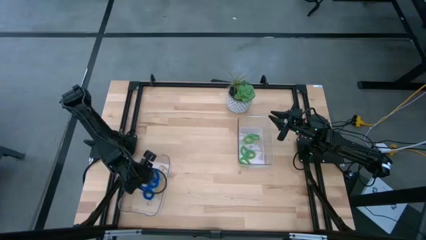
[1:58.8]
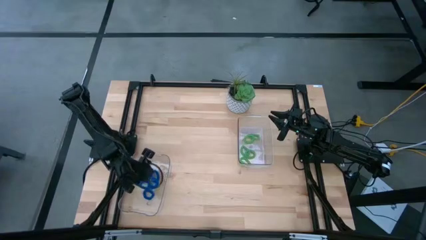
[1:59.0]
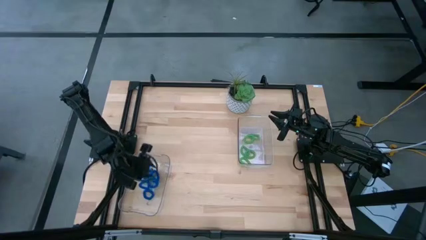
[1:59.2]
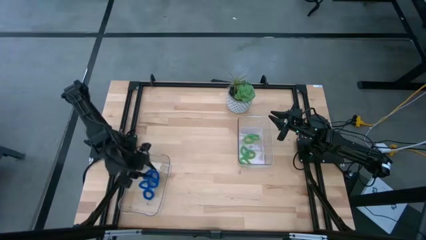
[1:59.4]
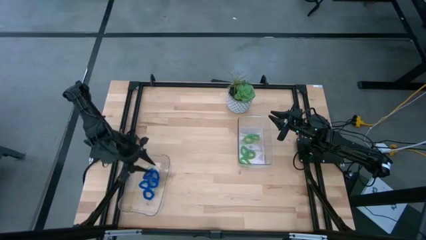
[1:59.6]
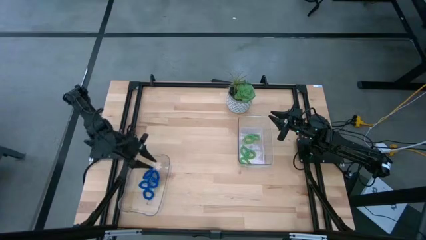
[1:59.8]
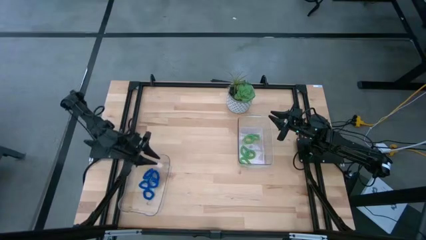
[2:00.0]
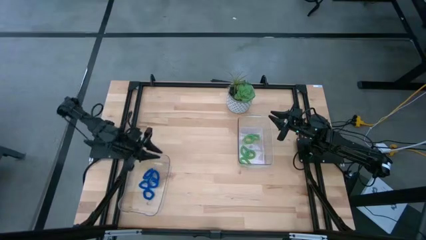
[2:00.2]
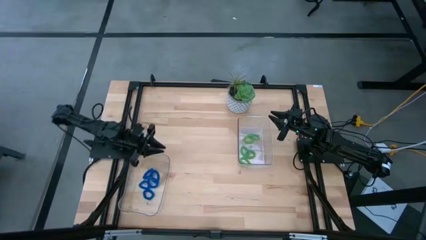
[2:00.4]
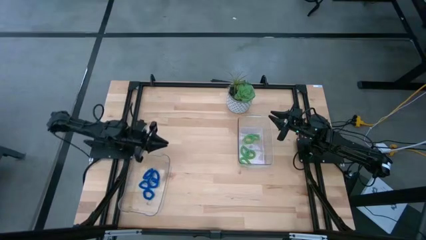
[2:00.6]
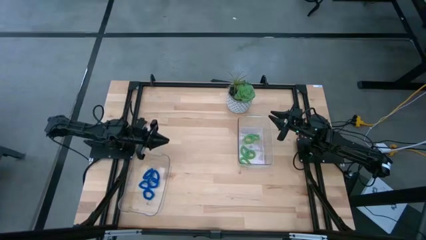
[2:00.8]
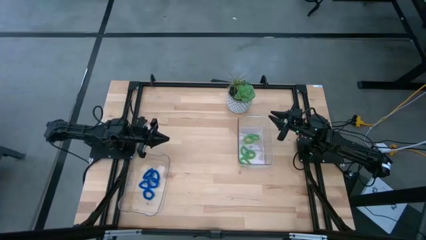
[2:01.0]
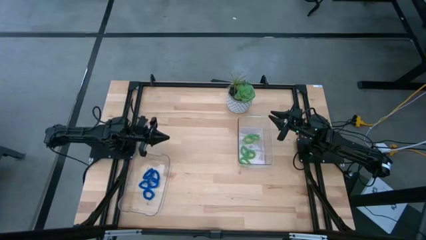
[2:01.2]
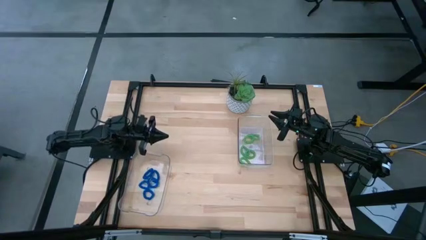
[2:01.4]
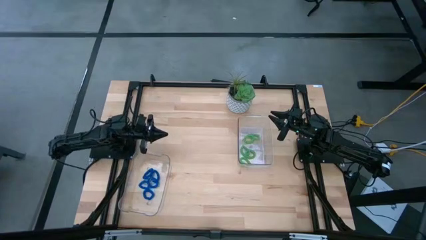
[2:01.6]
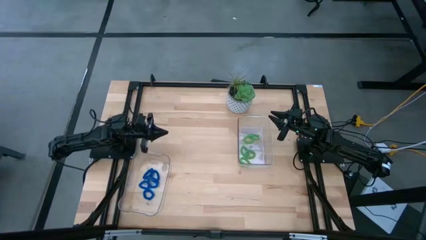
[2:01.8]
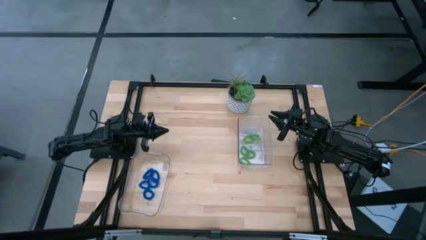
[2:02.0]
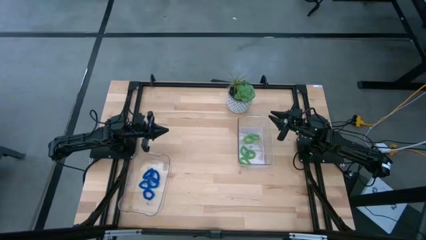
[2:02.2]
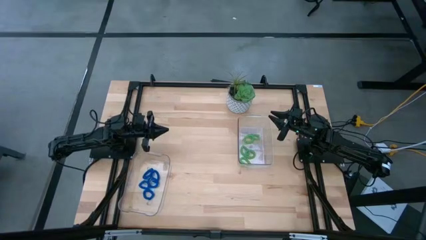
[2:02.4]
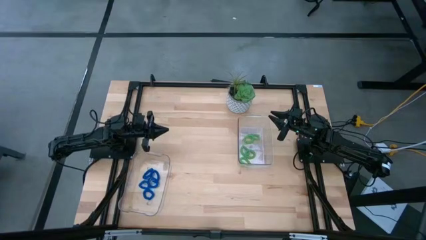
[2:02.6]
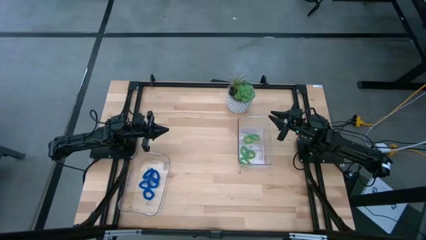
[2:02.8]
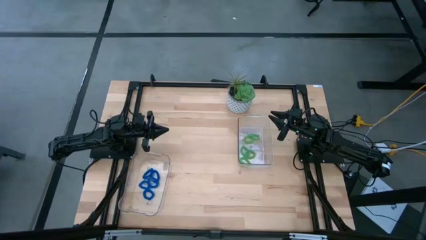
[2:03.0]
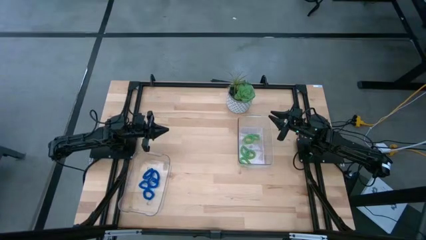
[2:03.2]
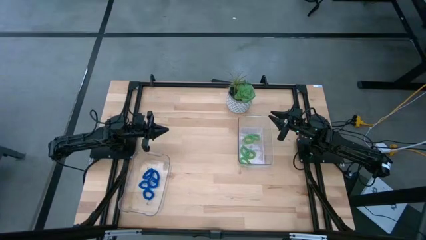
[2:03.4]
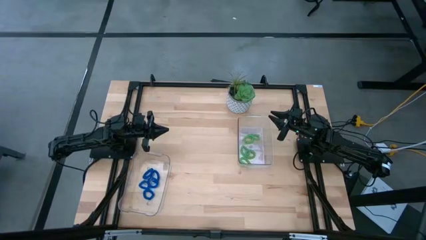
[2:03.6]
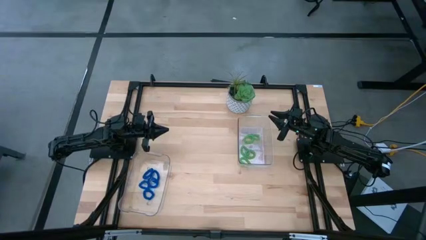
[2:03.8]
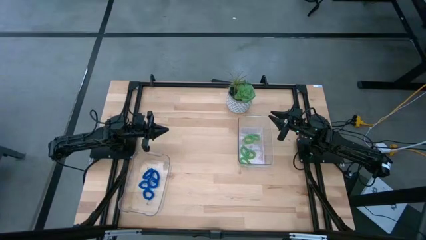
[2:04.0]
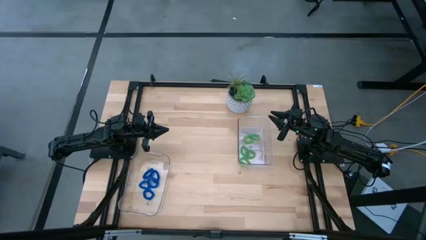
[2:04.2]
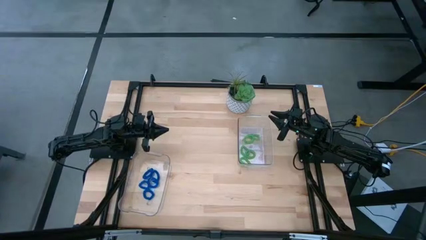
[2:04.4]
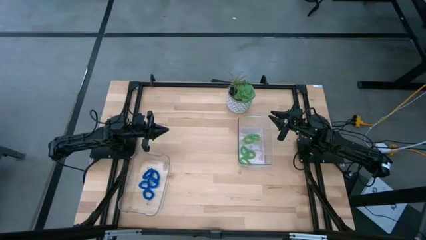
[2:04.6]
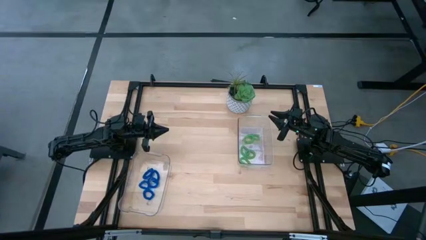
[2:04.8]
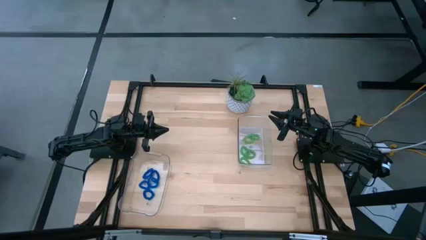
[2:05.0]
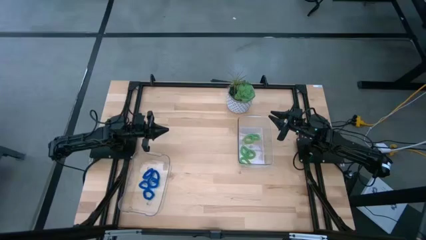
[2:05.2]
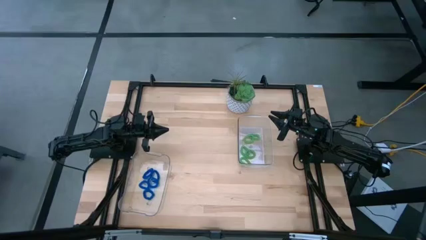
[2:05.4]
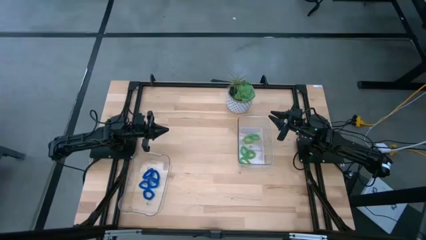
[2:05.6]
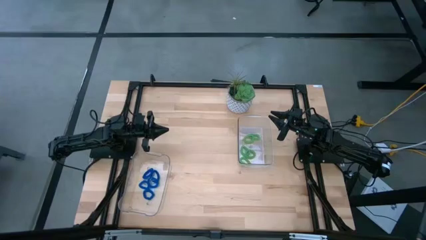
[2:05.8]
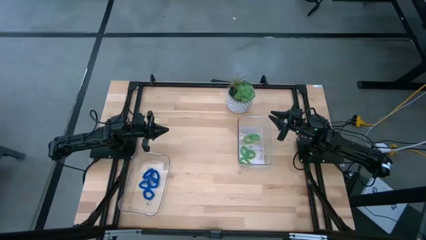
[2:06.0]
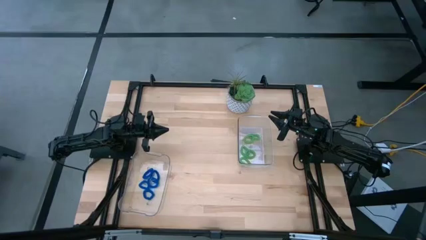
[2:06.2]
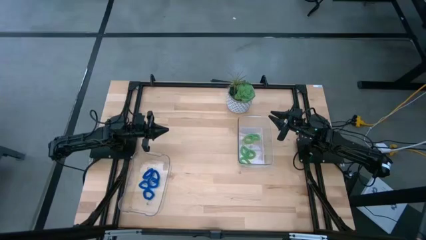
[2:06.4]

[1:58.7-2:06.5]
Task: Sort spring keychains
Return to Home Position

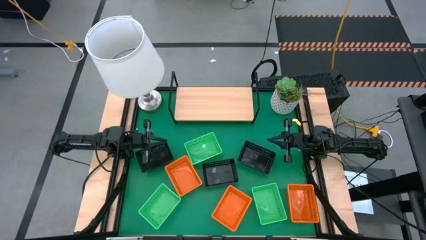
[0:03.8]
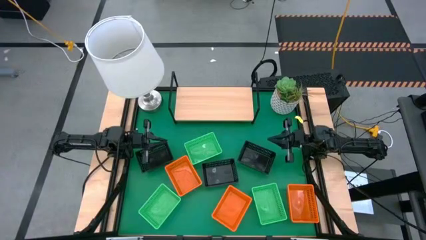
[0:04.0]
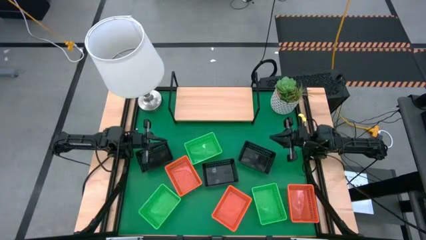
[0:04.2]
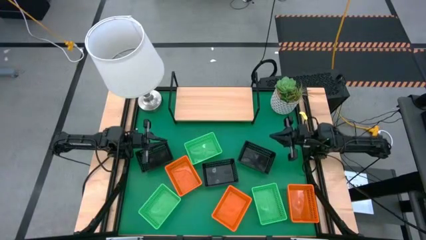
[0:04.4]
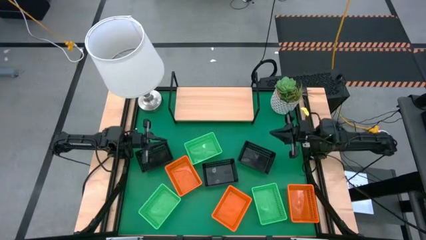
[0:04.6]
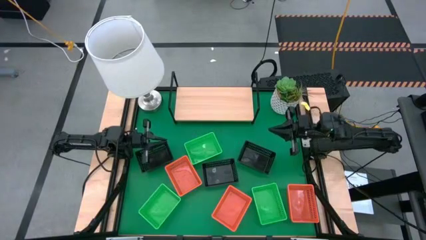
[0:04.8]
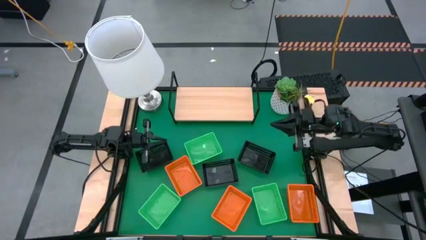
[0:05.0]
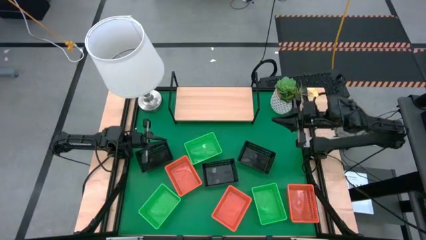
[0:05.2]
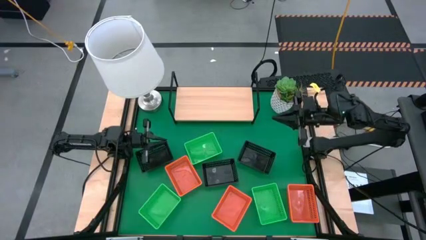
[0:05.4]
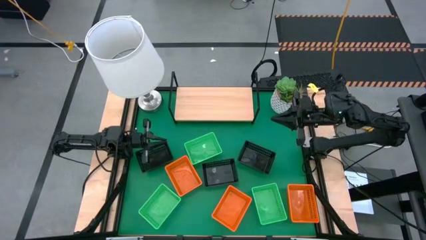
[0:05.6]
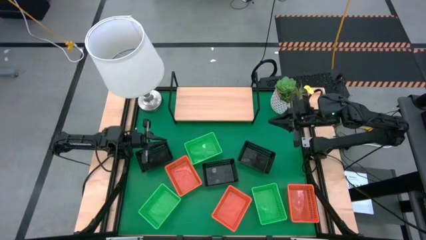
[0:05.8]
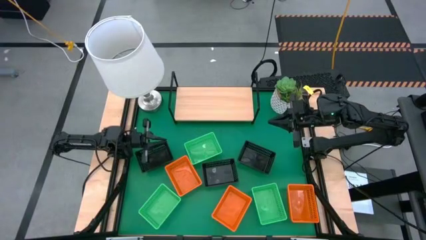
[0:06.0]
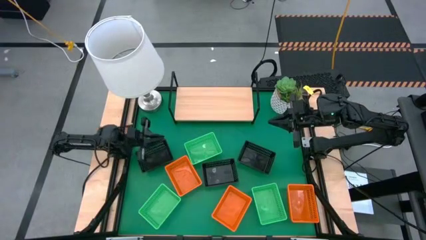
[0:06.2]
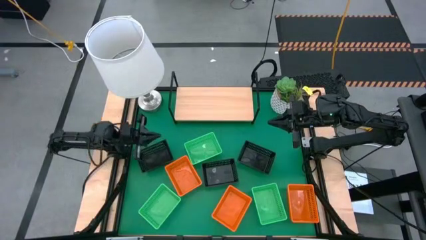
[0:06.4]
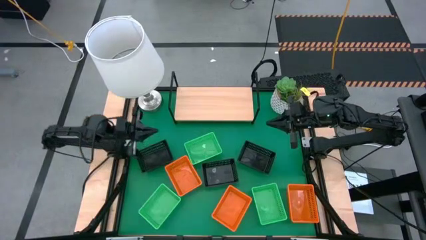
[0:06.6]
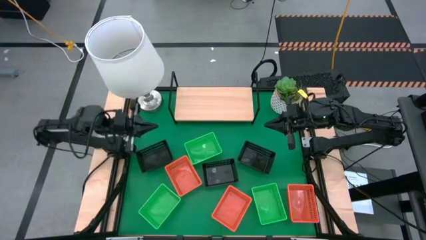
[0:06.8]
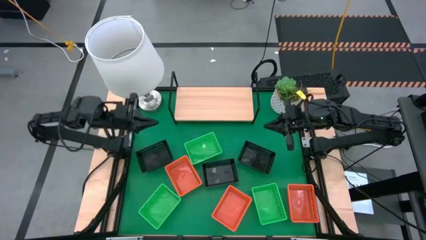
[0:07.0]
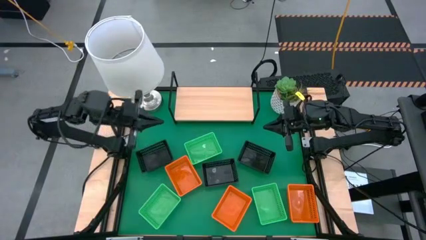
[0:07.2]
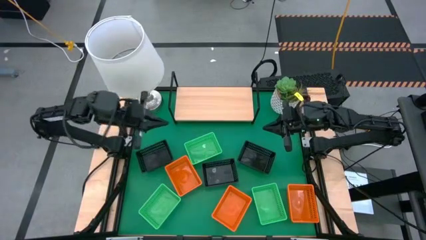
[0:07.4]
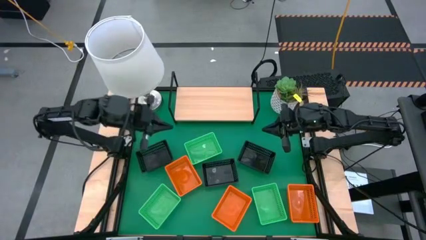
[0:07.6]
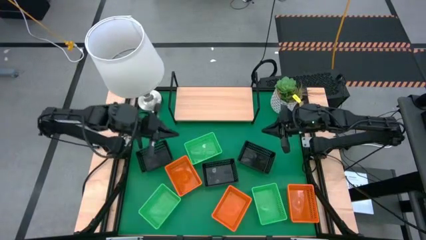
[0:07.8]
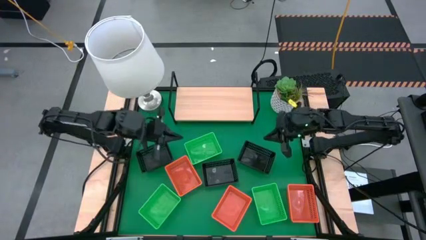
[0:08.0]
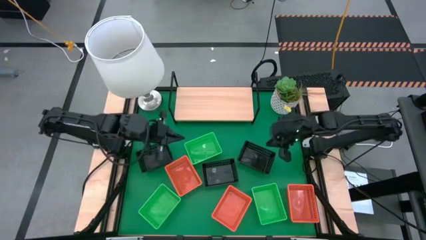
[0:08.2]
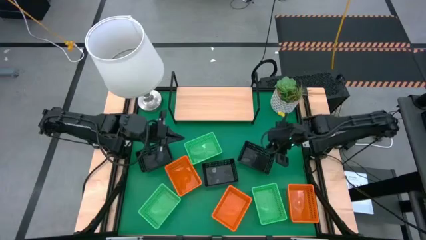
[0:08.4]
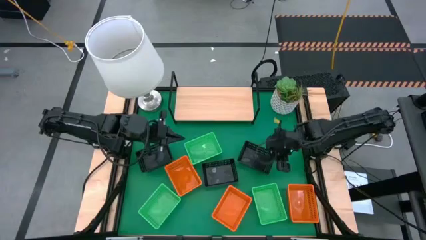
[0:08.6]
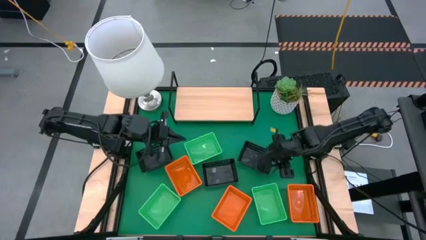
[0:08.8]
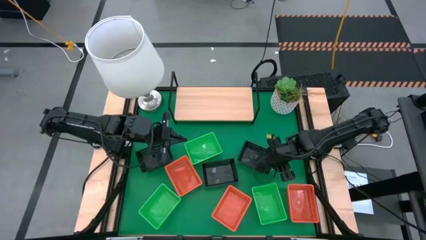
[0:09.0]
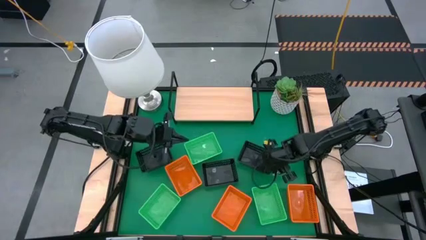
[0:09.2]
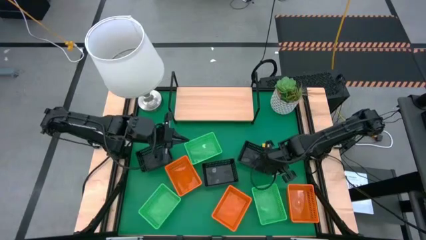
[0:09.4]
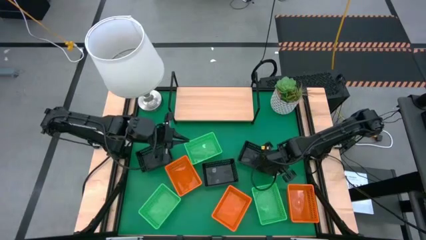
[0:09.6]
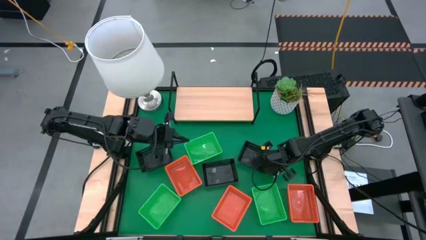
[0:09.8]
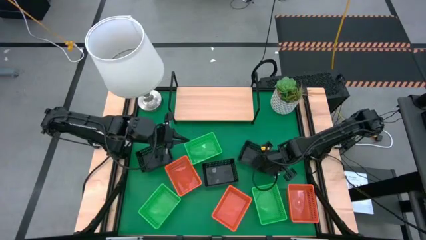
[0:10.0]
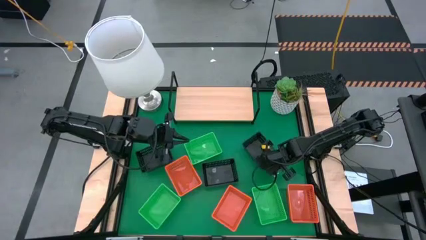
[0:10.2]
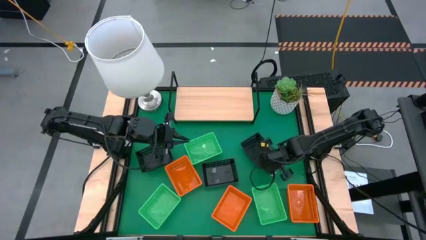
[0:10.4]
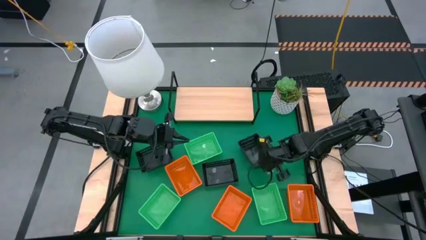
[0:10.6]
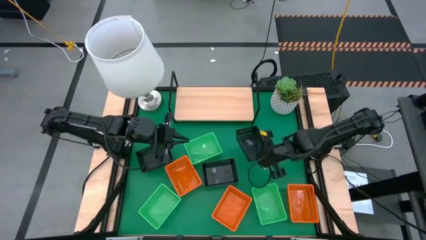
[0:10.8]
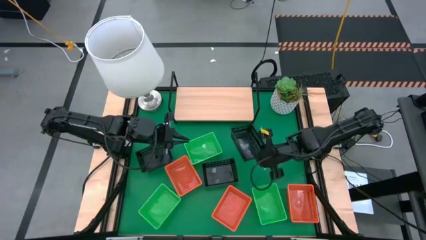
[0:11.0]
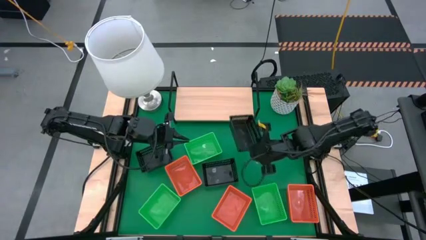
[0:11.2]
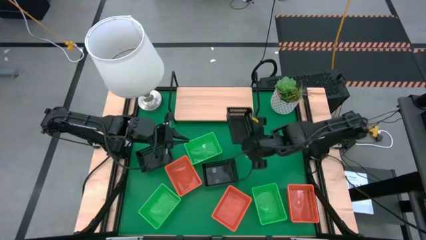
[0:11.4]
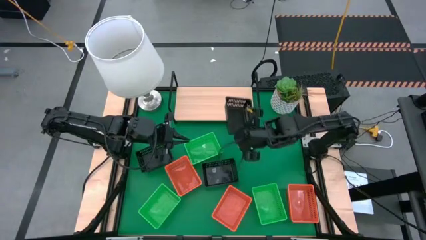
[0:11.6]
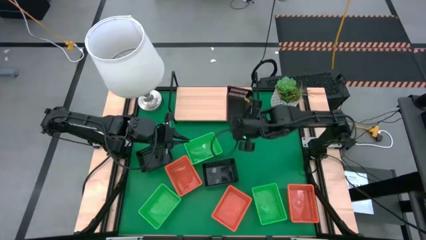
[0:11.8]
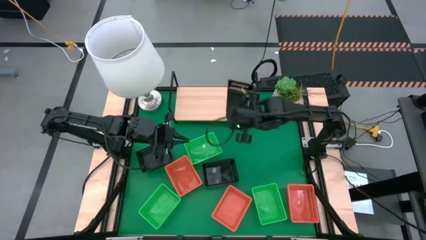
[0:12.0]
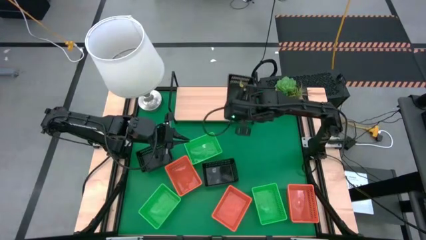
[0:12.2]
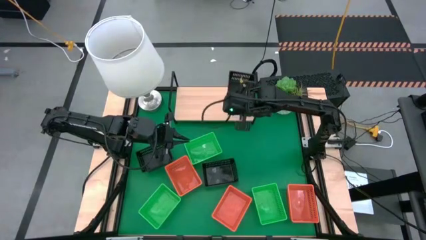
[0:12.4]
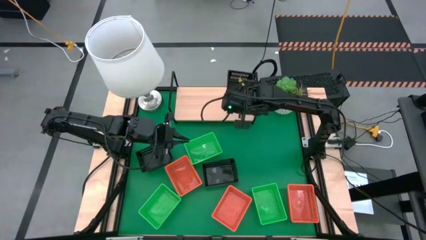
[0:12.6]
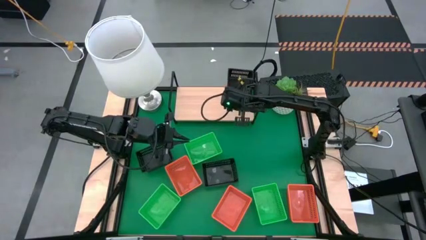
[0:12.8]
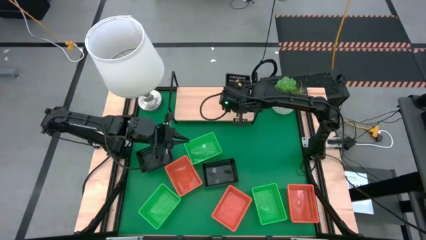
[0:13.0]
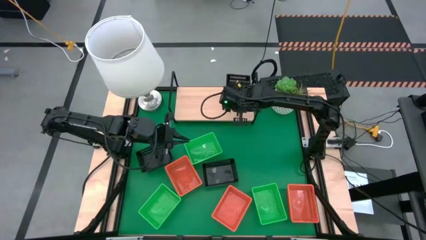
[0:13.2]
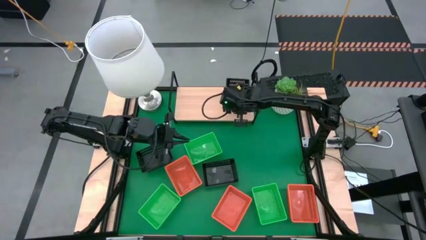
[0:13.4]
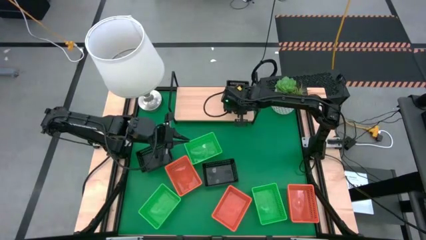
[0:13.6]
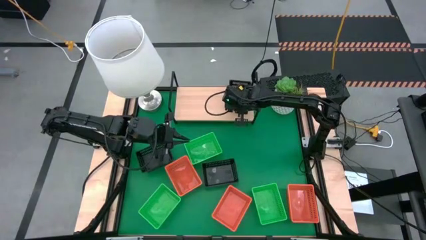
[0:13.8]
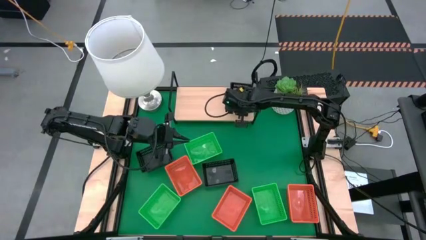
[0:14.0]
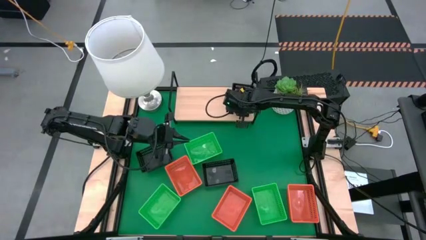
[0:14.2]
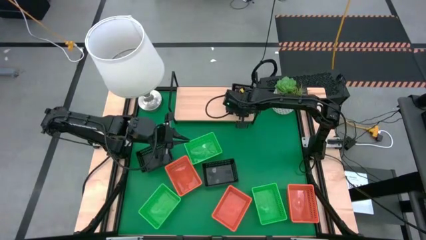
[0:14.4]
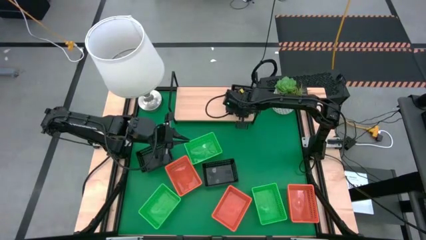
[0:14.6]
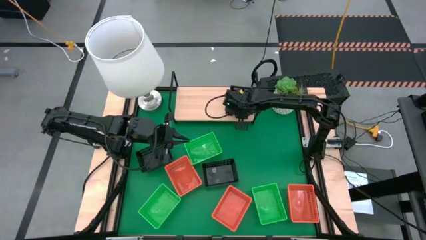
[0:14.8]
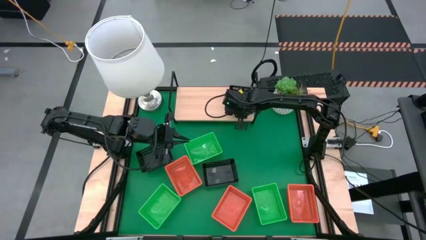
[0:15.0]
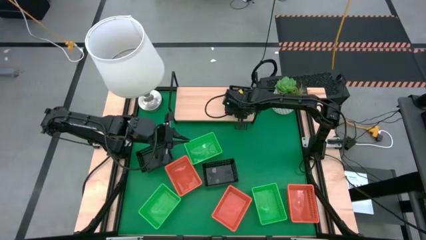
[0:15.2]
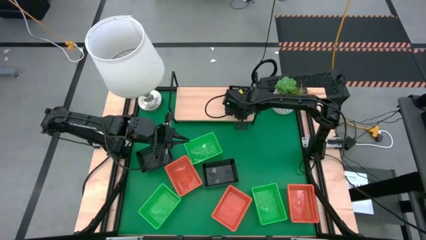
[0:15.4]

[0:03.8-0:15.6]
Task: Stack baskets on shelf by color
Put the right black bin on the shelf
